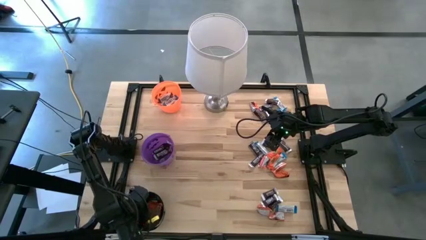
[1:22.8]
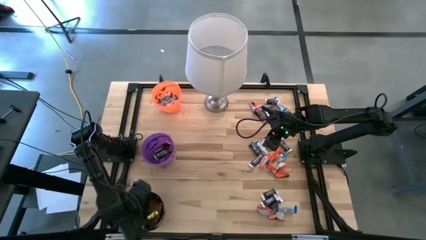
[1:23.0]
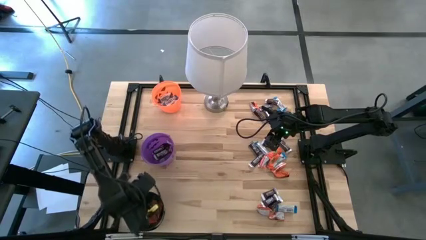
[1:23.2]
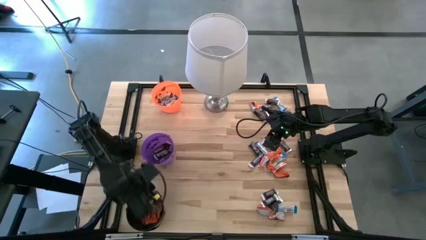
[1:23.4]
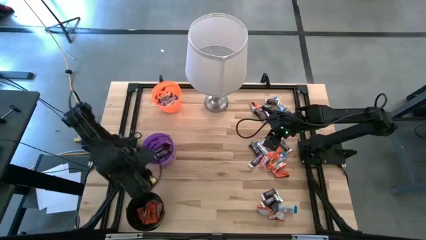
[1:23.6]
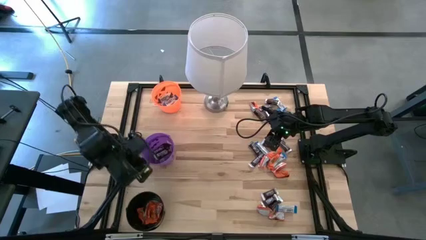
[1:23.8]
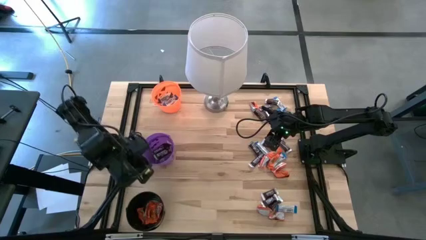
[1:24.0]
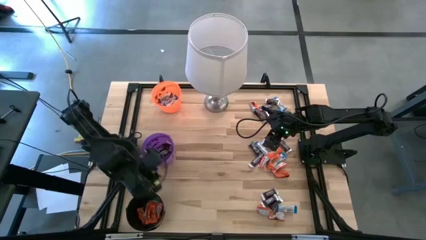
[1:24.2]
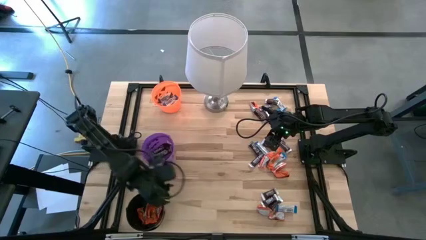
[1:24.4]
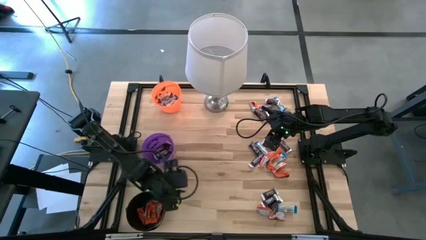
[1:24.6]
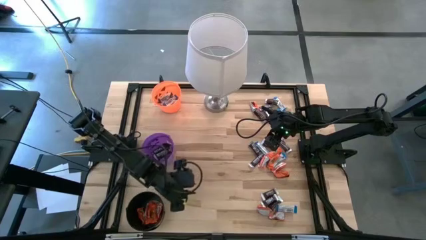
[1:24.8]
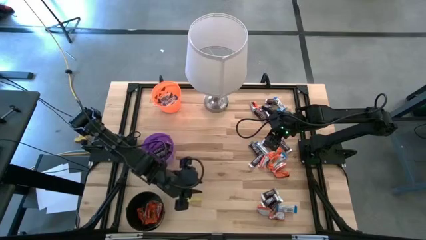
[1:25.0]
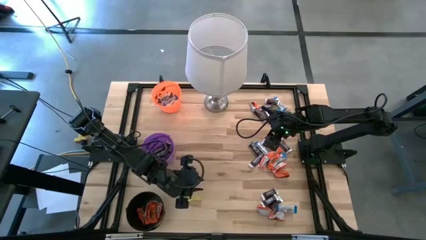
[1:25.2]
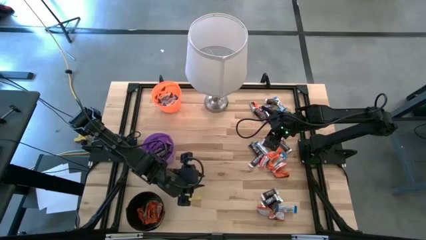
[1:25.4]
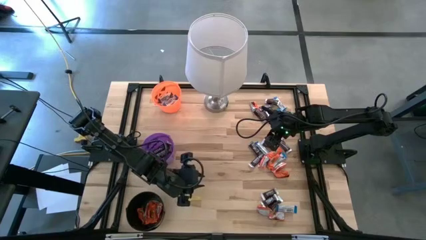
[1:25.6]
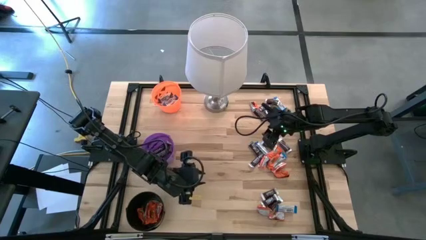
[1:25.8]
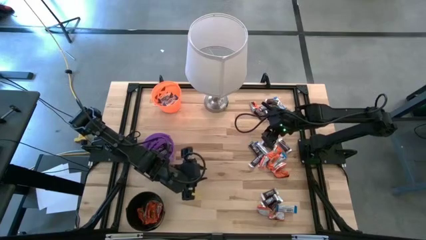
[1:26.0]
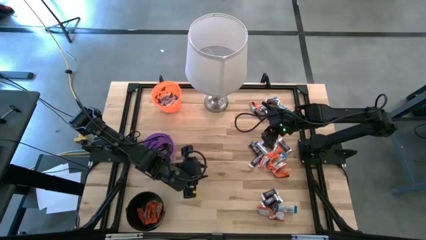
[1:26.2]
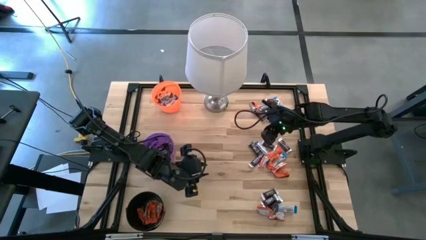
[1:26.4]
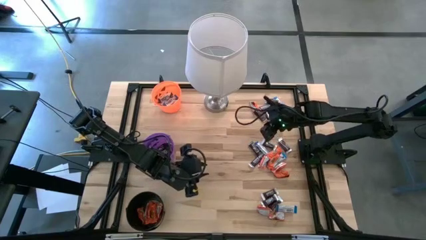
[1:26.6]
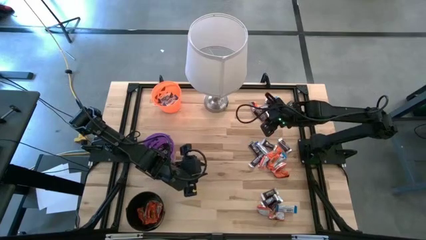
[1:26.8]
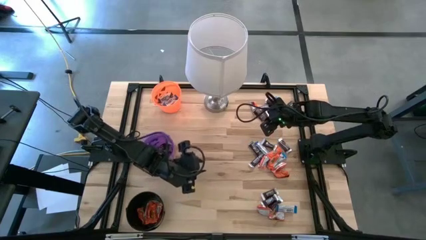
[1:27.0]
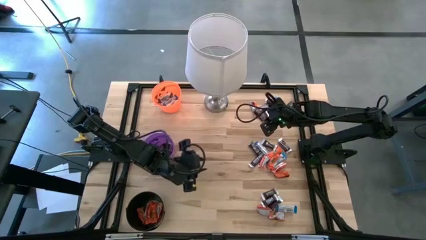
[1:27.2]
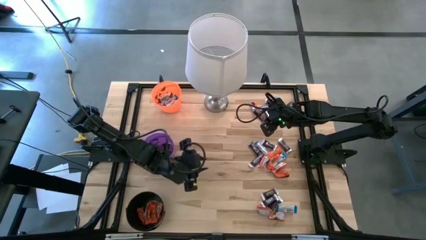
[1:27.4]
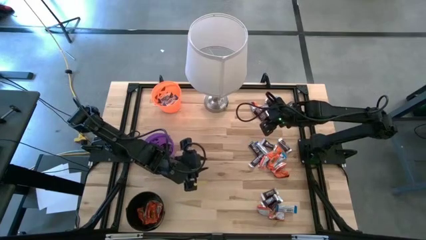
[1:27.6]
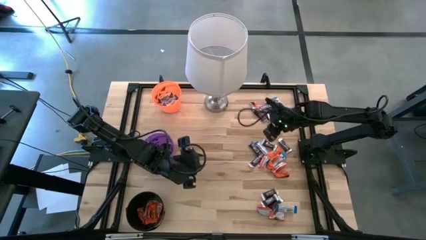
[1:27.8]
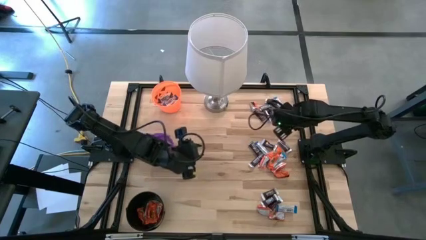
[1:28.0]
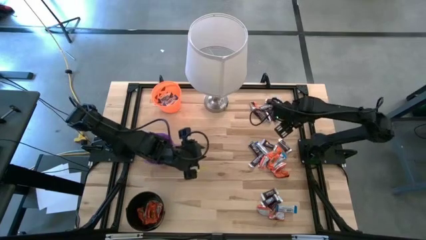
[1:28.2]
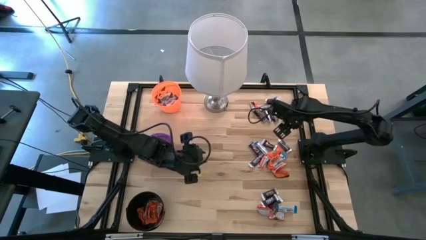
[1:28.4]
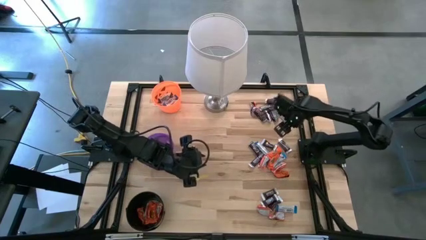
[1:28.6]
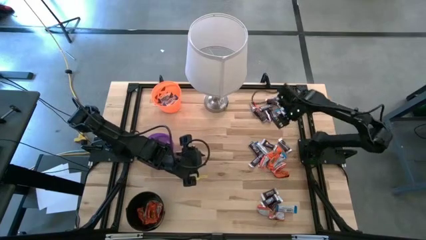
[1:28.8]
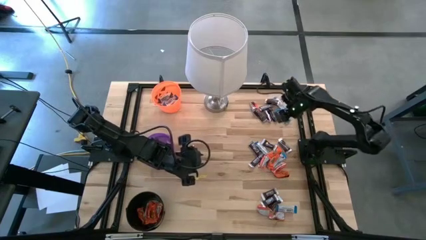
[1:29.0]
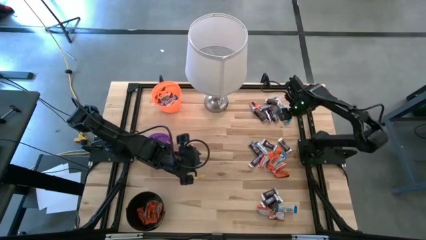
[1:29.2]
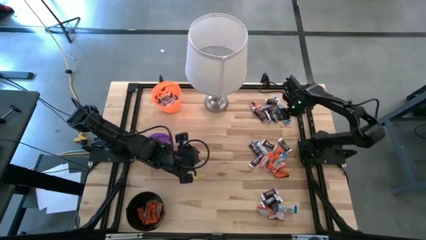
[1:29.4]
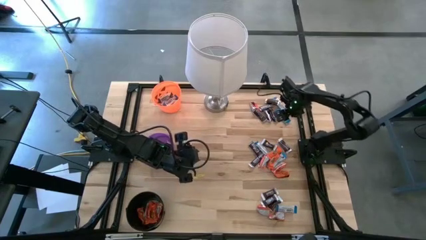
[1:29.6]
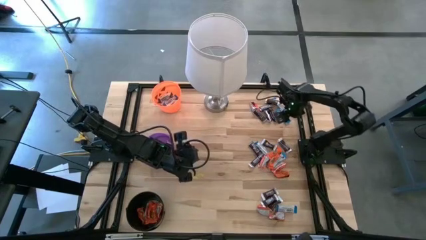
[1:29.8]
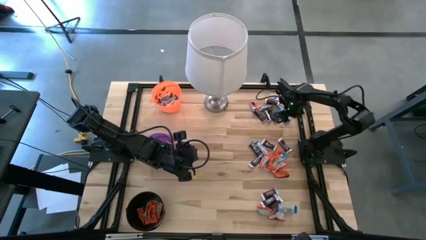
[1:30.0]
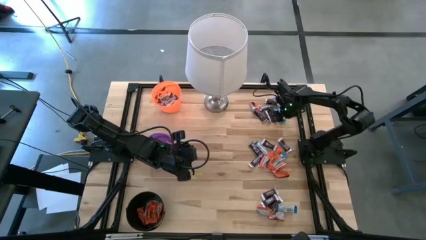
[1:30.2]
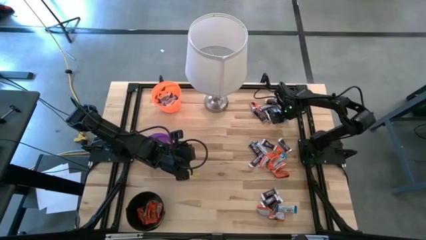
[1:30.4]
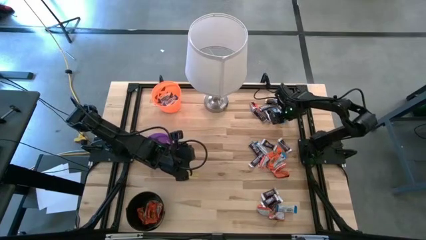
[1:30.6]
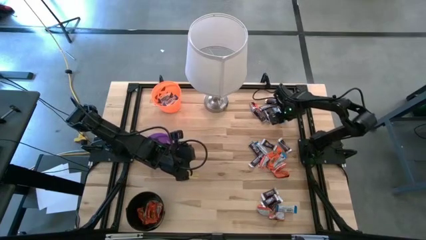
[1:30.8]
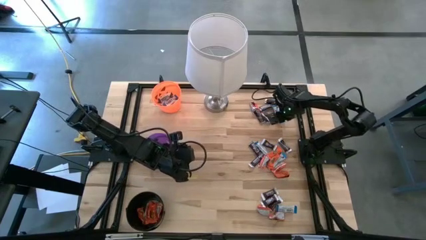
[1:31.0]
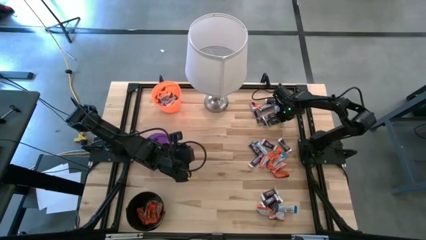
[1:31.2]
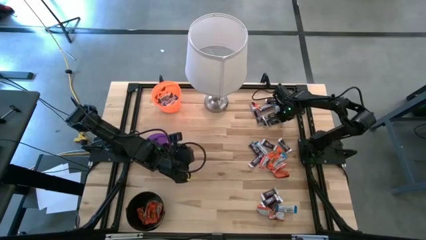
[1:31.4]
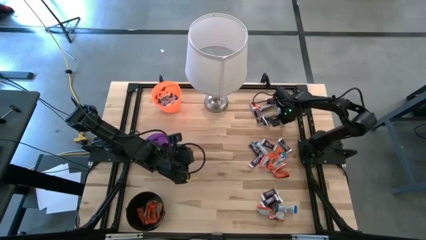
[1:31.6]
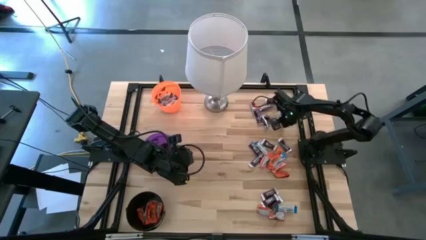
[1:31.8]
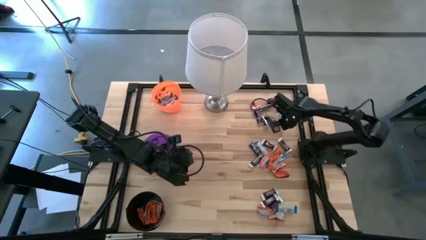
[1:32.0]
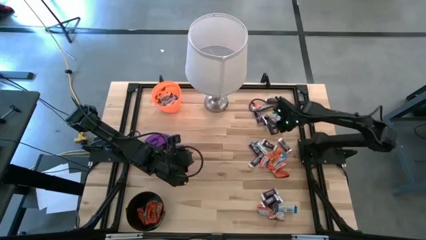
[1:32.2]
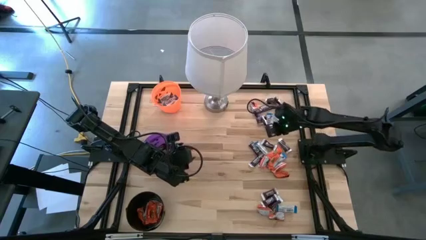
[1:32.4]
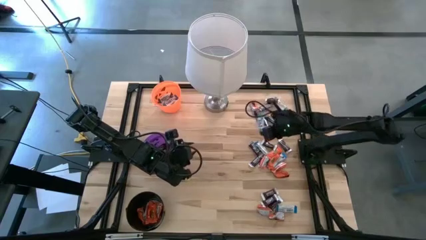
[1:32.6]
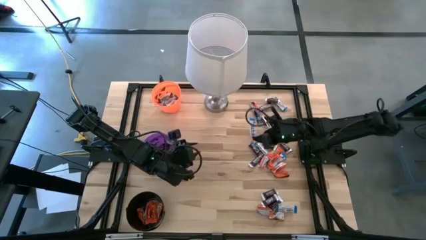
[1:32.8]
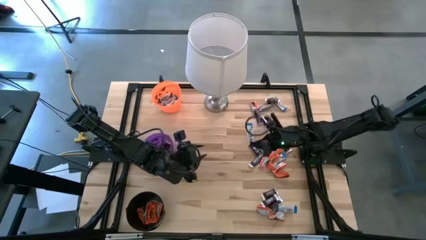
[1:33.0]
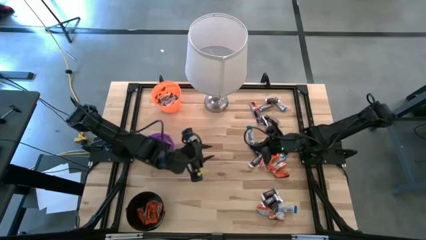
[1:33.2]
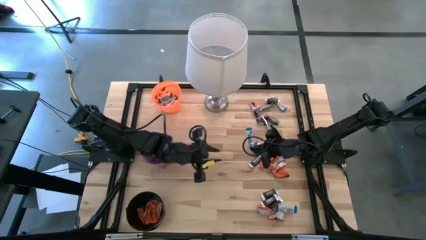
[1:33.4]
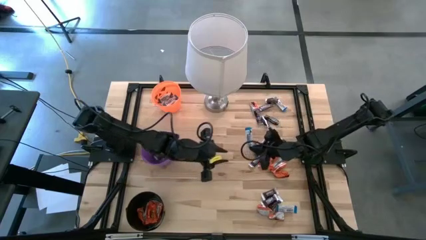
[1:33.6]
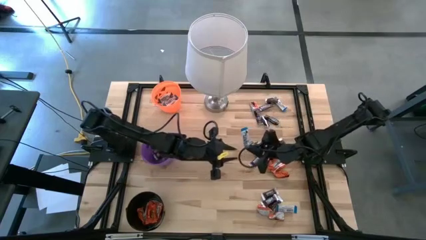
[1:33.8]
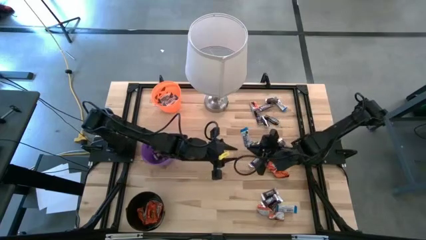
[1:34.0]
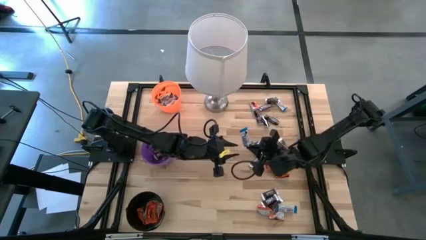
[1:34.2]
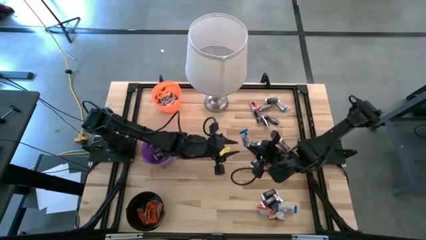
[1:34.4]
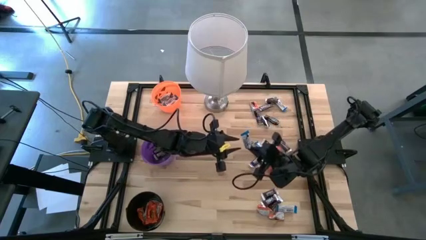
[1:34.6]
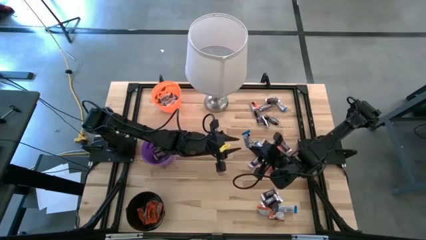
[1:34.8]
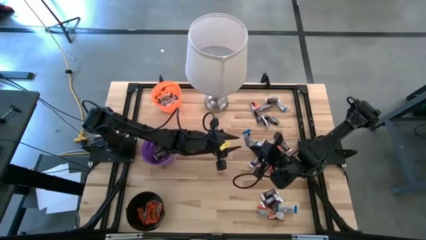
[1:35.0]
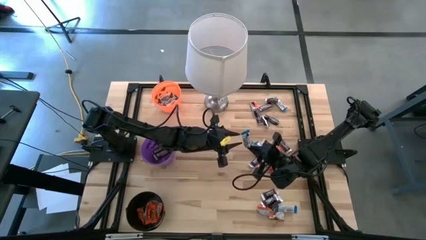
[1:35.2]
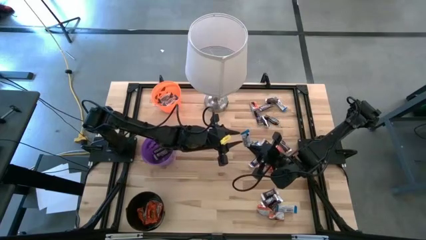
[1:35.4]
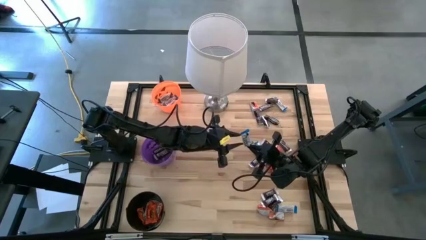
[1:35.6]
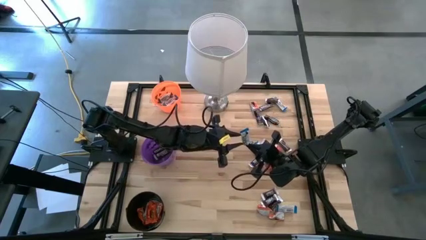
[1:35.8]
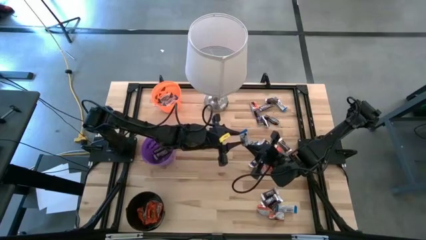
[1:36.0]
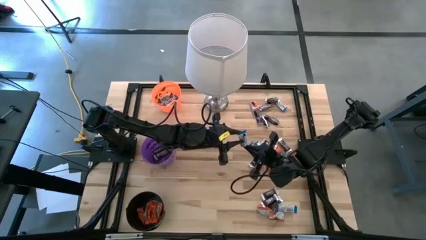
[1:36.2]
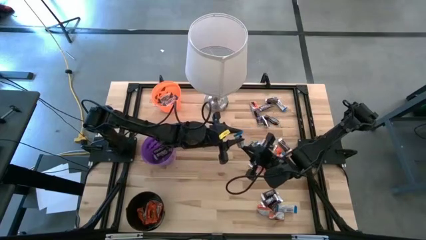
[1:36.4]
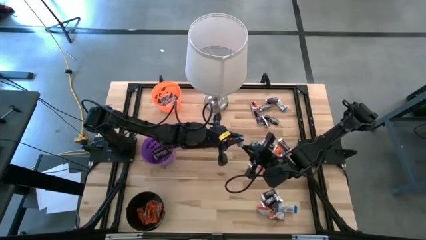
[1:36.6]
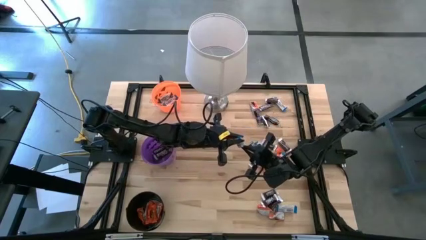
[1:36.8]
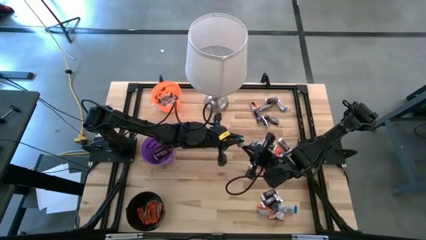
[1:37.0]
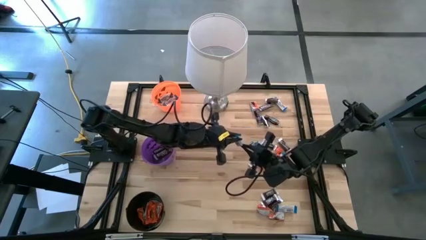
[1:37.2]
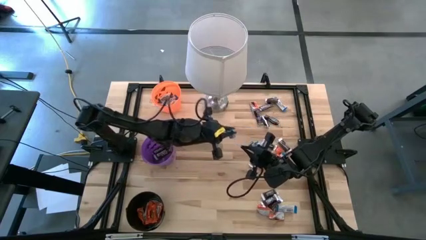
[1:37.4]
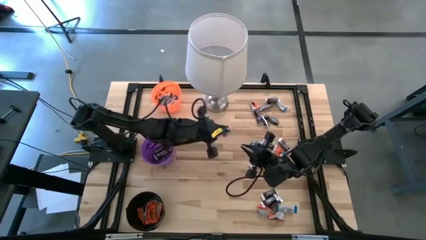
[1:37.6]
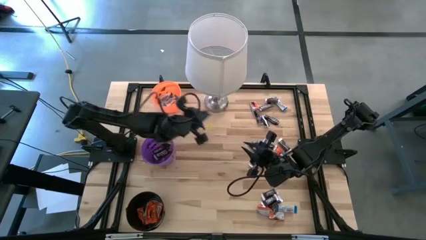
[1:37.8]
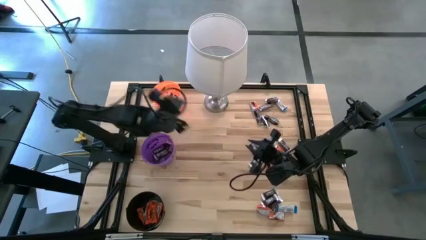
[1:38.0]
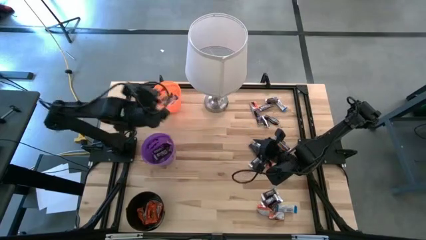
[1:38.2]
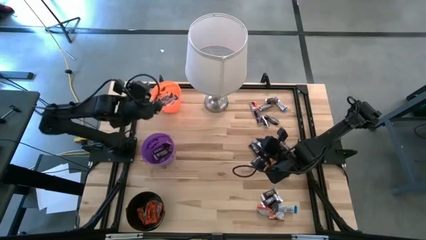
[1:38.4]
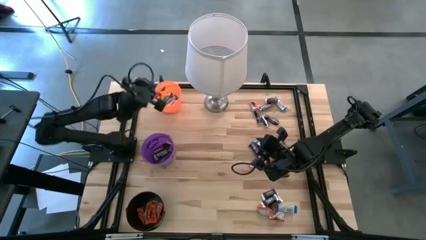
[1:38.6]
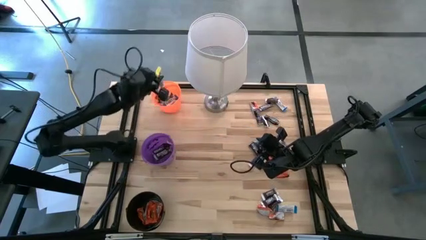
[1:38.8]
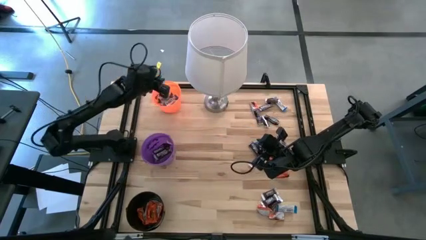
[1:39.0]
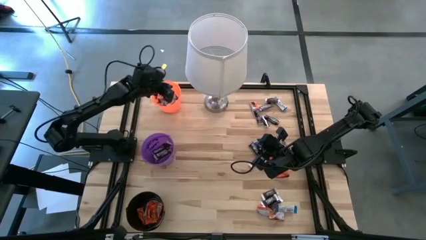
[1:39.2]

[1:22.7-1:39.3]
Task: Sort candy
Put the white chocolate into the orange bucket
